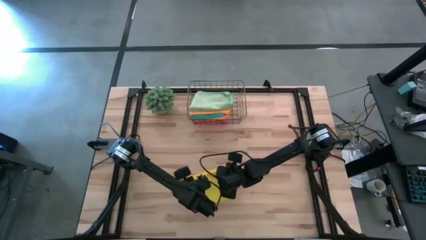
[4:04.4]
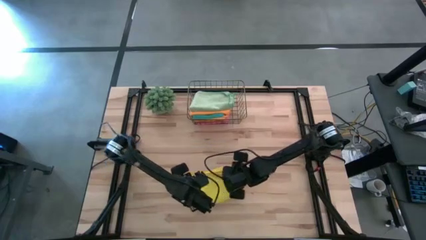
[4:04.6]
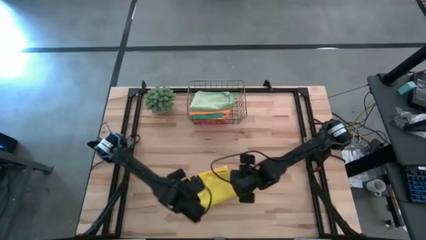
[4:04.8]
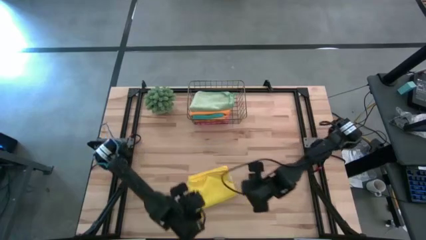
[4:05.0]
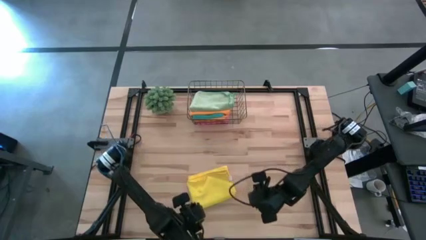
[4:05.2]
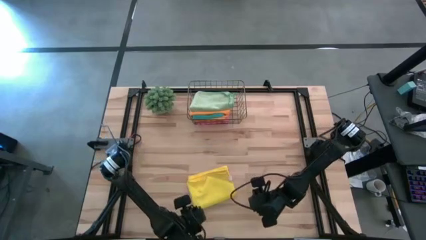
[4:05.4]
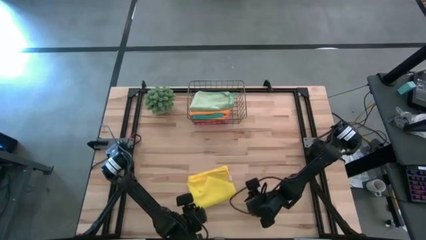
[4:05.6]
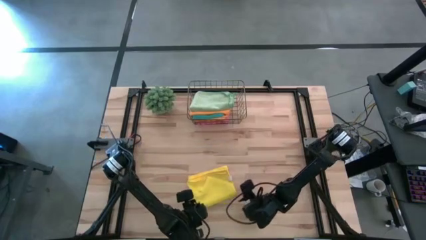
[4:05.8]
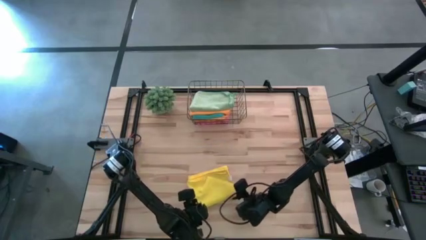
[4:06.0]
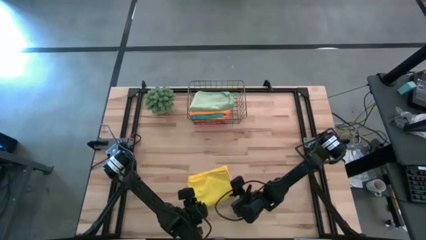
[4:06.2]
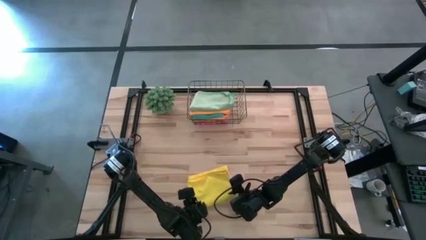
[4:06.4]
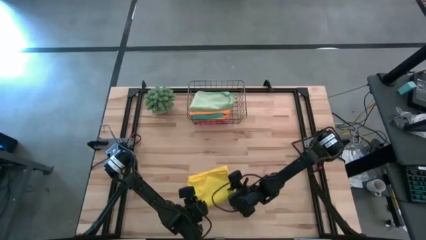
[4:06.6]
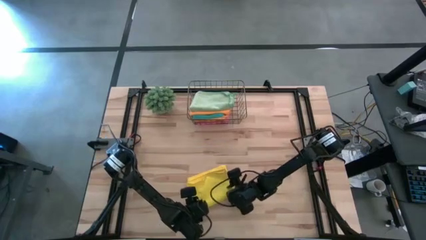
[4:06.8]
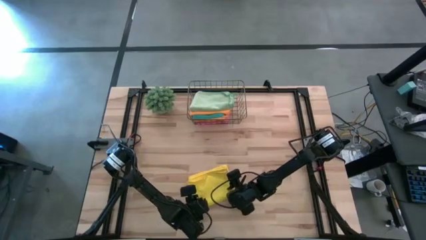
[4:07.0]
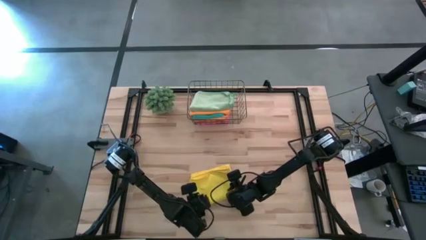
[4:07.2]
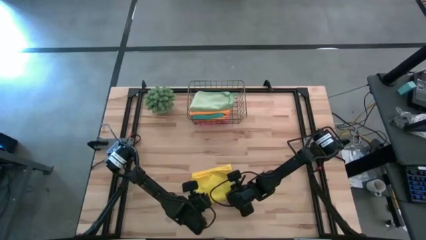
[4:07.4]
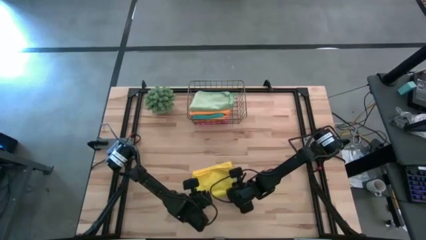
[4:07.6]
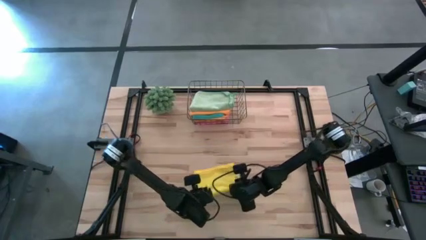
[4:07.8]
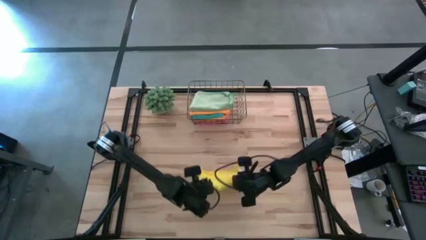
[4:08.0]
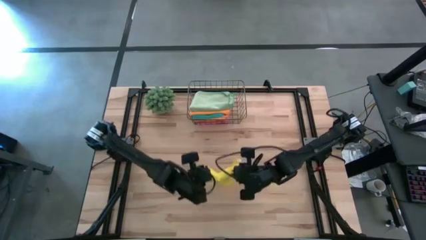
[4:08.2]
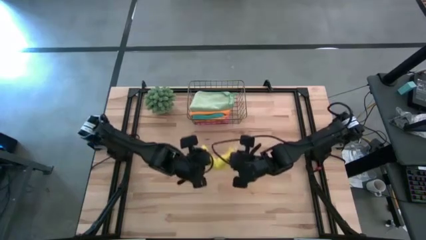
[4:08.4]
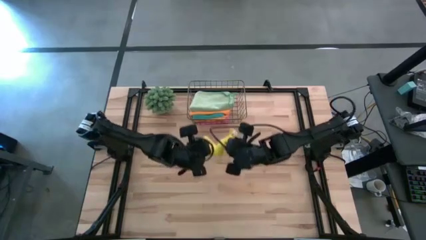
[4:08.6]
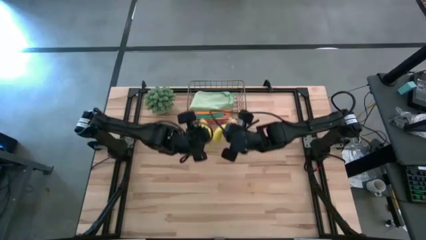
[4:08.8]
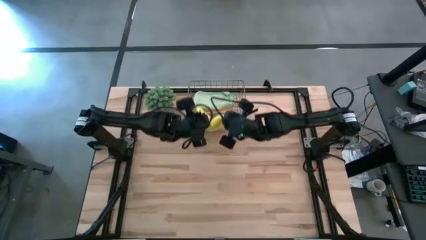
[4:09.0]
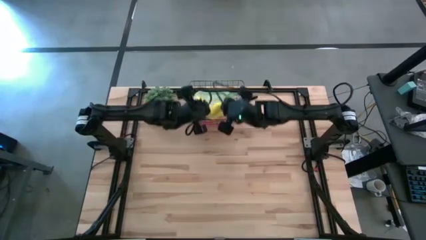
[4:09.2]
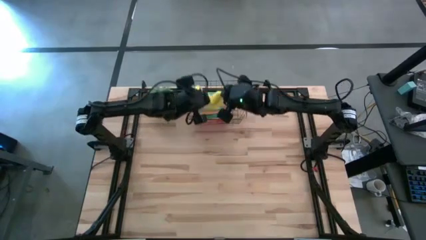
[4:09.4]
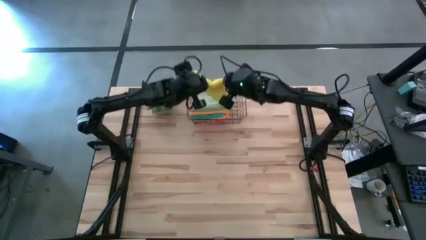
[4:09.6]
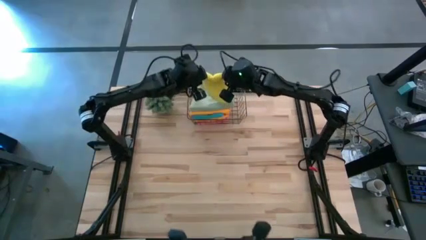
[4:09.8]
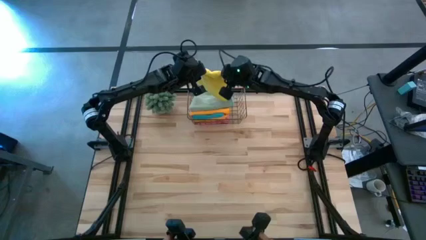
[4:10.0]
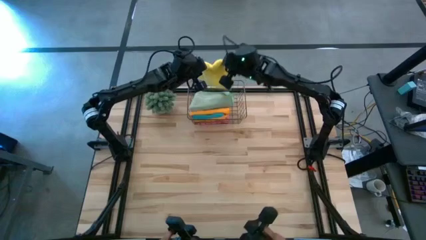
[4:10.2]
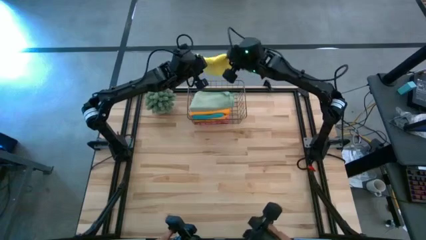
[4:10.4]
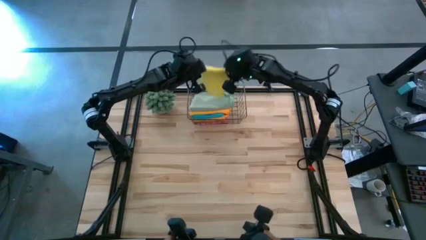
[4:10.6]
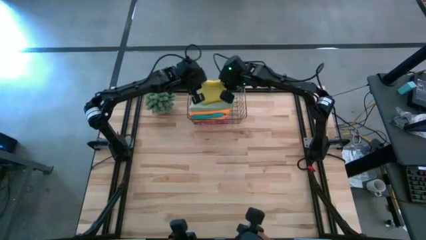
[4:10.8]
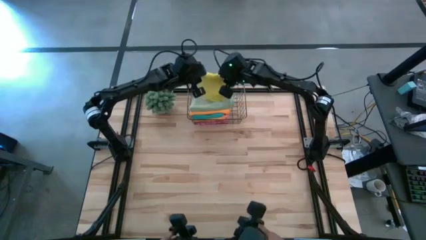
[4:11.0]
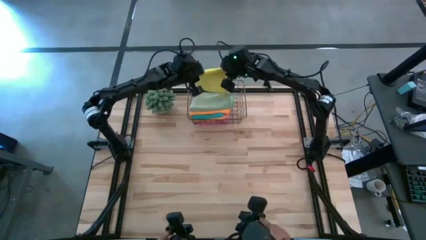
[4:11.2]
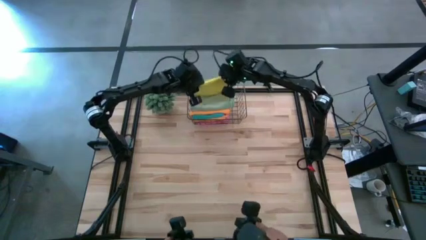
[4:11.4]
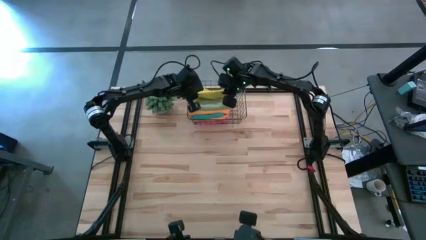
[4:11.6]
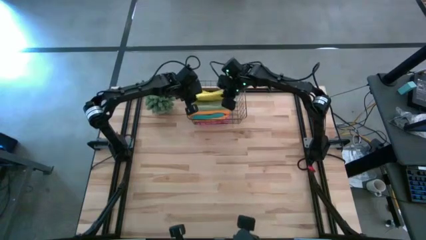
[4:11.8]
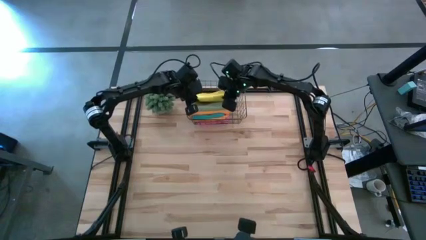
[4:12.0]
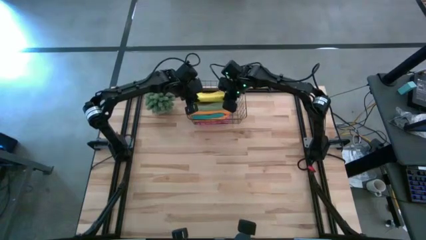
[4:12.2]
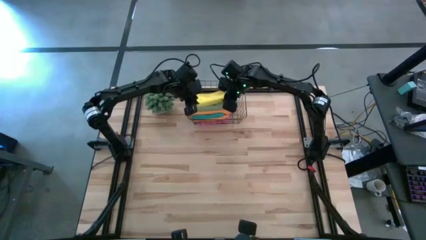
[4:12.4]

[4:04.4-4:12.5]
Task: Fold microfiber towels
Put the folded yellow microfiber towel into the wire basket

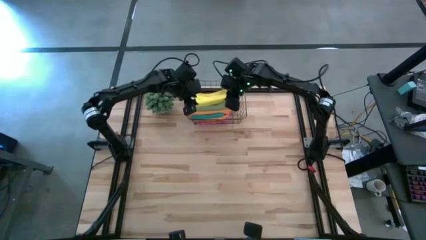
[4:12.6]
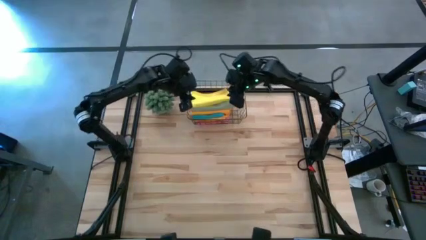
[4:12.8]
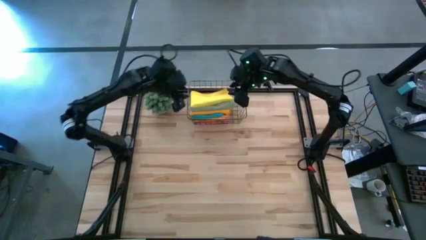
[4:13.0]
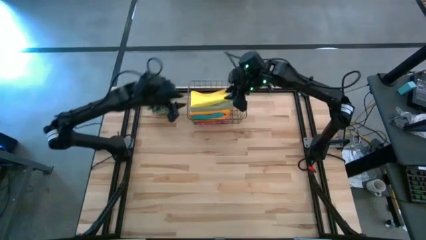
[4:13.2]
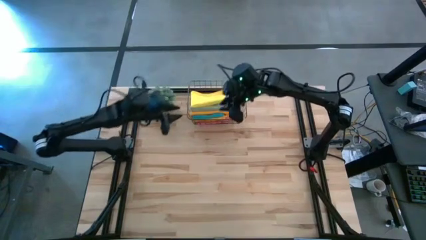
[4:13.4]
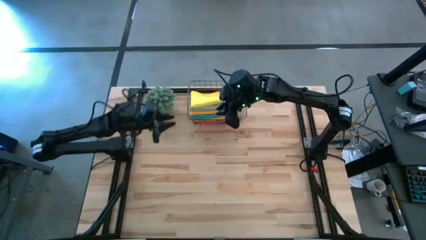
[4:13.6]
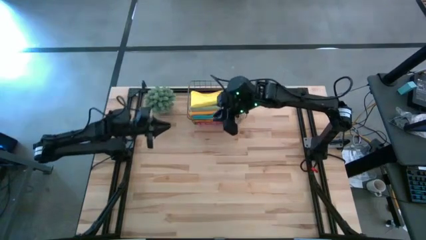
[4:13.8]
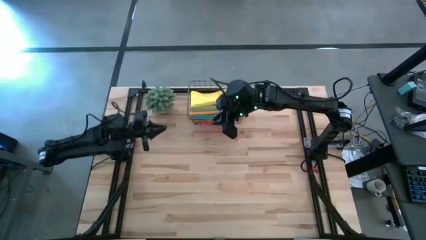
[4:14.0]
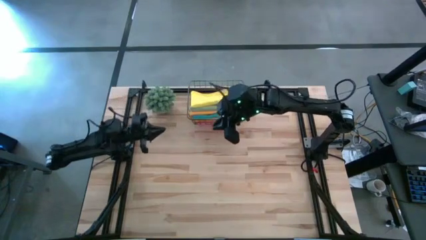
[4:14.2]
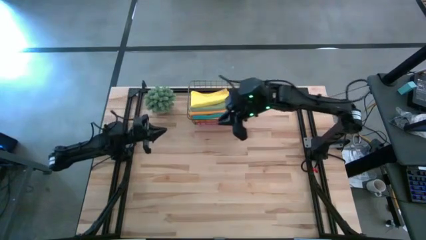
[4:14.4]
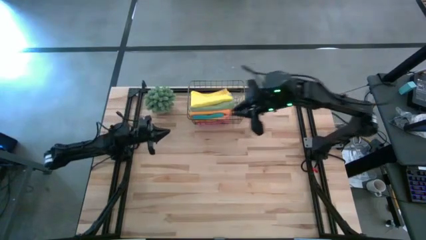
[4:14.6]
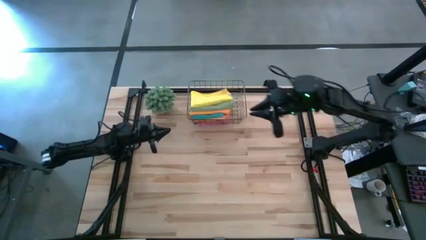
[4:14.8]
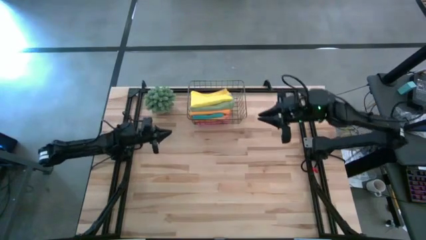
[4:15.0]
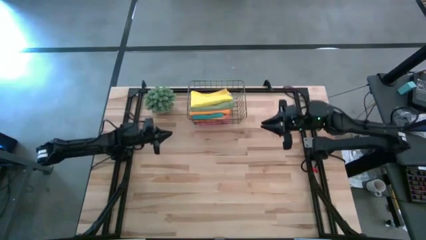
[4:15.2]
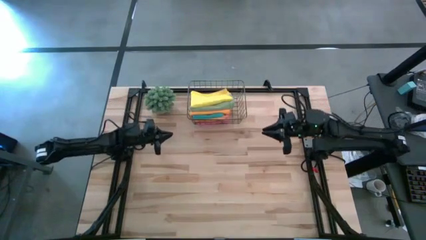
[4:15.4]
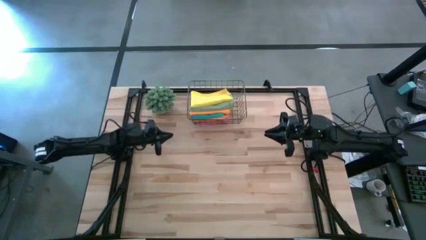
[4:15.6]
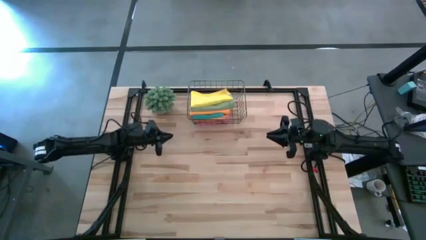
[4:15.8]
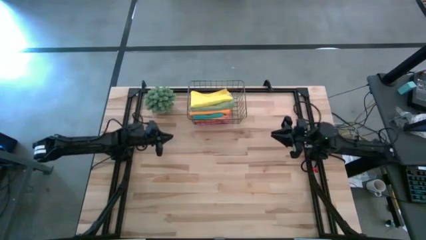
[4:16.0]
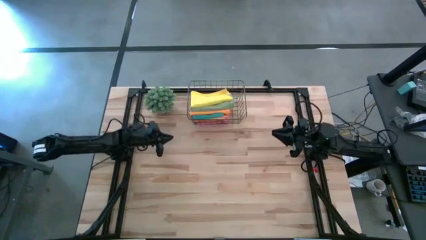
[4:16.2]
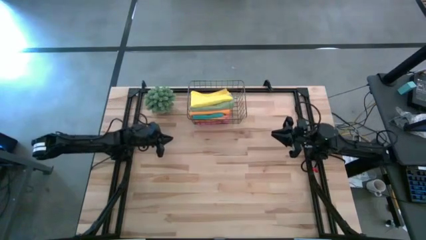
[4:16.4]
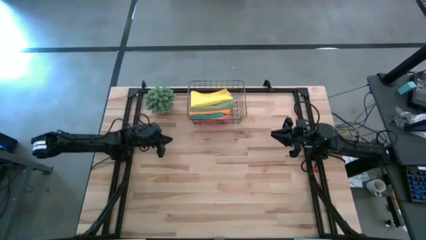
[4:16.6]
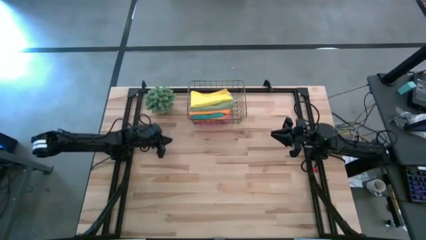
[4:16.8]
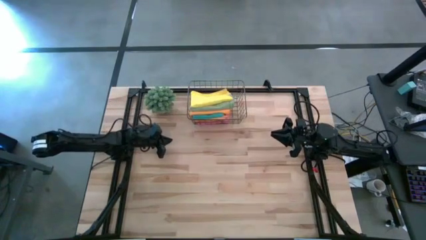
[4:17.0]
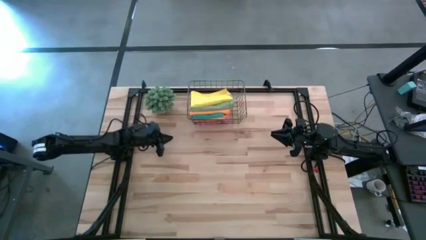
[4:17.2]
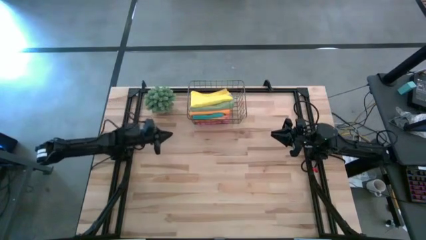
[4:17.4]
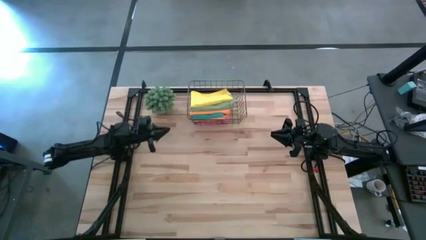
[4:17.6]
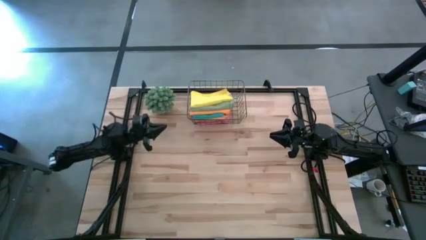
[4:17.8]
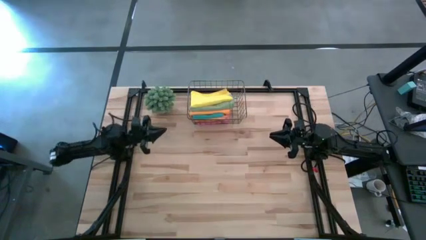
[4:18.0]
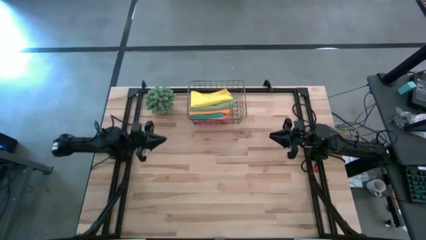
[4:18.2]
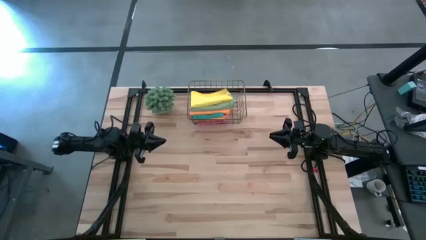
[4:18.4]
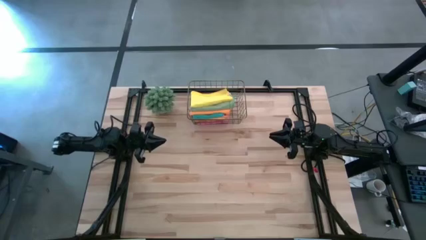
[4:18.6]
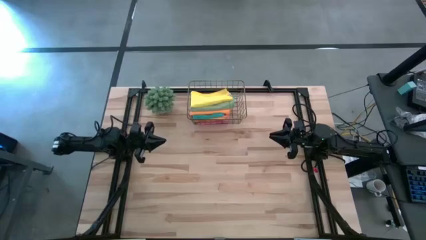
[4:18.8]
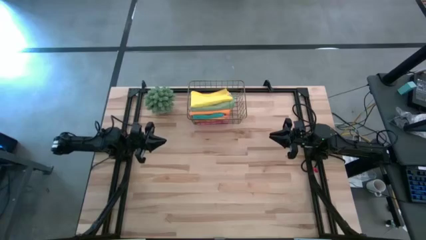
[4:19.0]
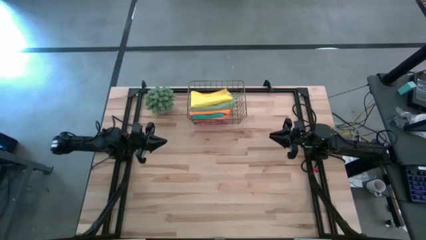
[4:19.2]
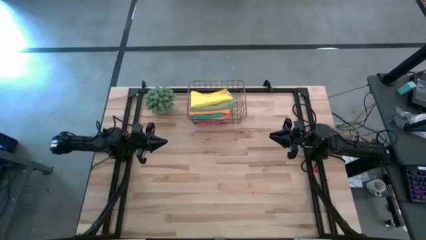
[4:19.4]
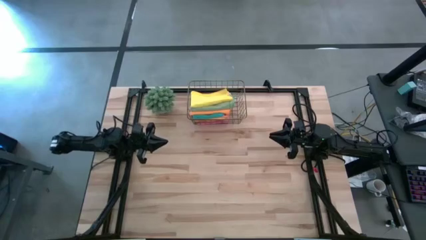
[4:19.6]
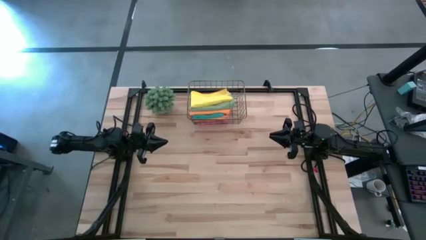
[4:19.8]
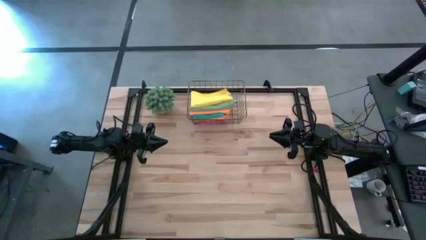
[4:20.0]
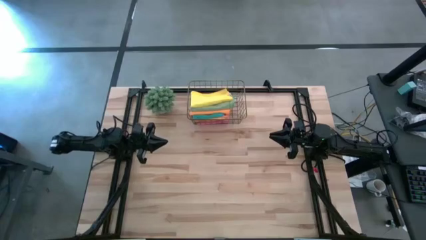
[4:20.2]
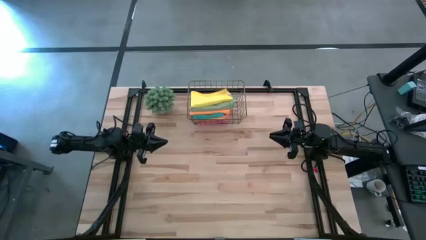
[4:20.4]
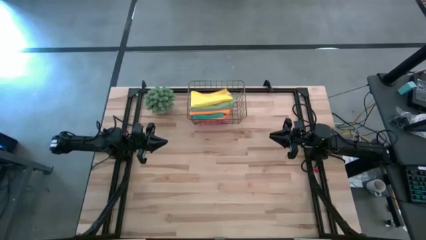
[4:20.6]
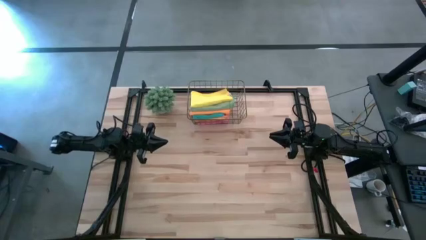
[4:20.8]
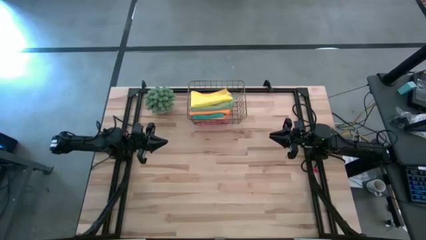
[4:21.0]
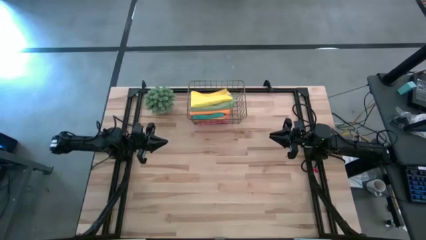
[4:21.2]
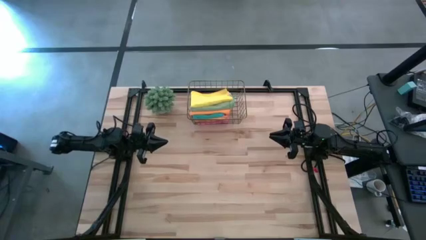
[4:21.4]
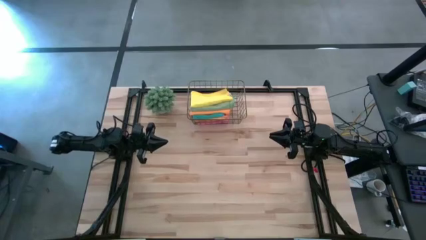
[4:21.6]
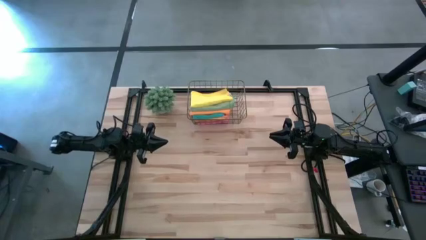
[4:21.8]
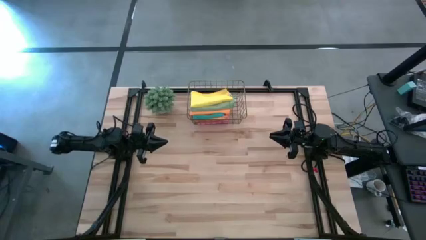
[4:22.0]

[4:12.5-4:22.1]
Return to Home Position
